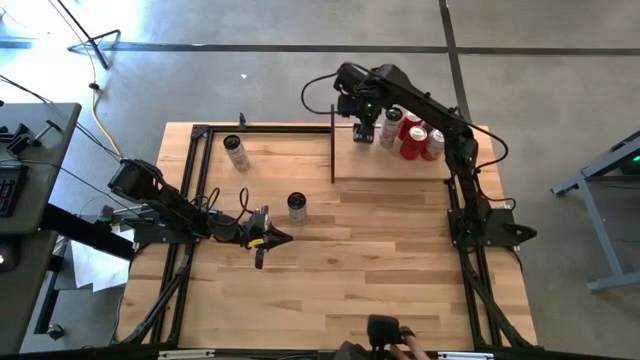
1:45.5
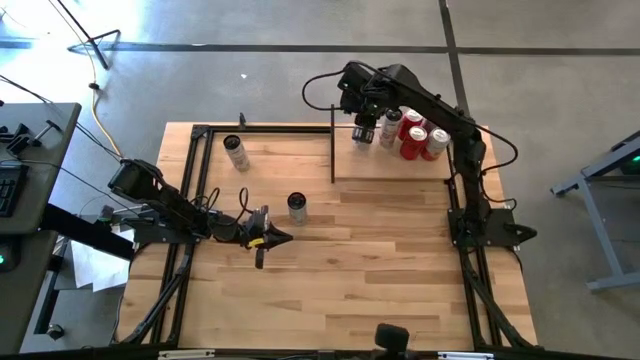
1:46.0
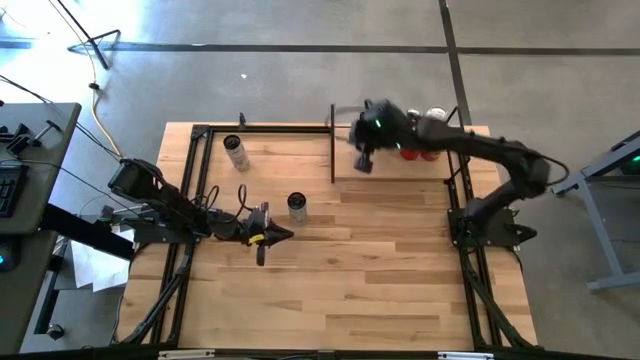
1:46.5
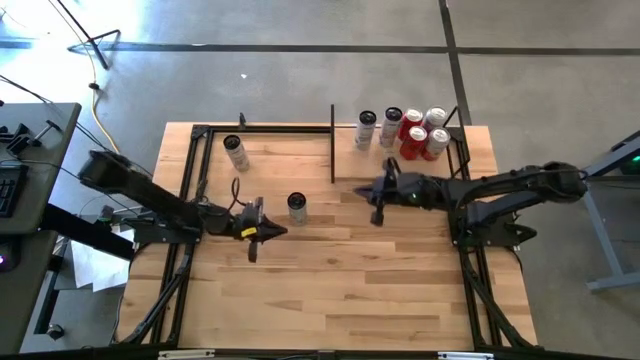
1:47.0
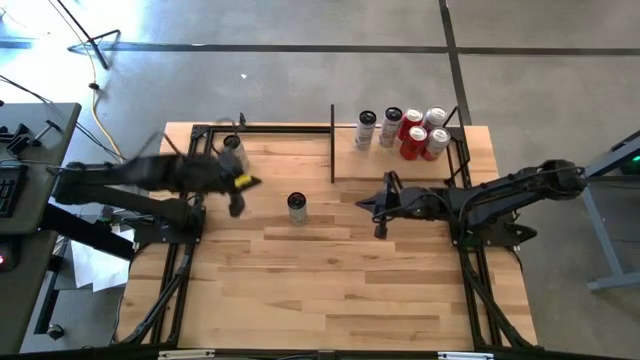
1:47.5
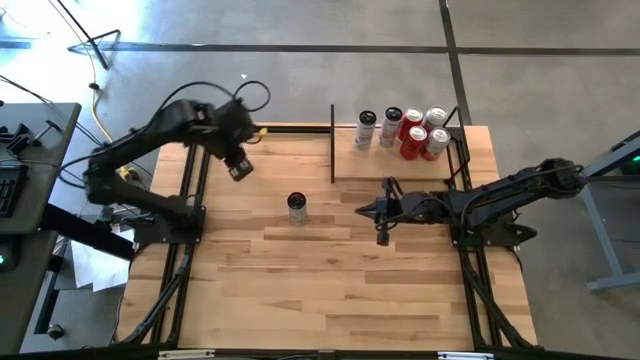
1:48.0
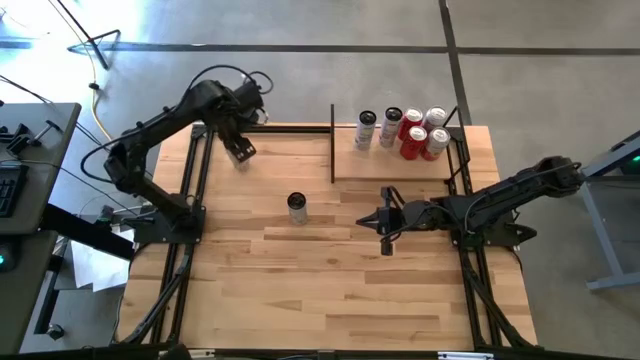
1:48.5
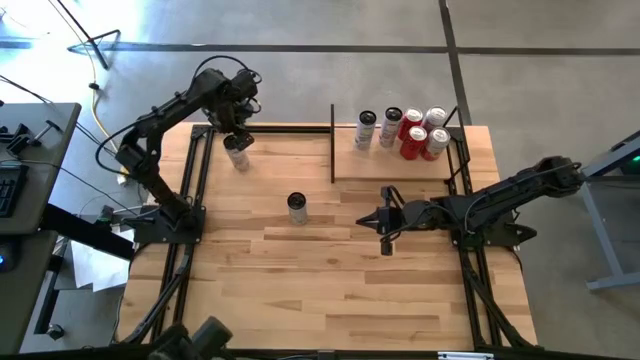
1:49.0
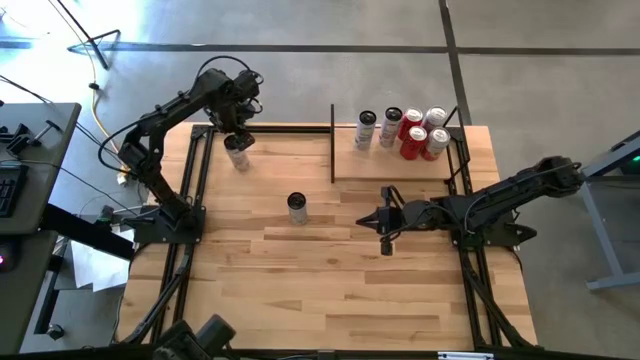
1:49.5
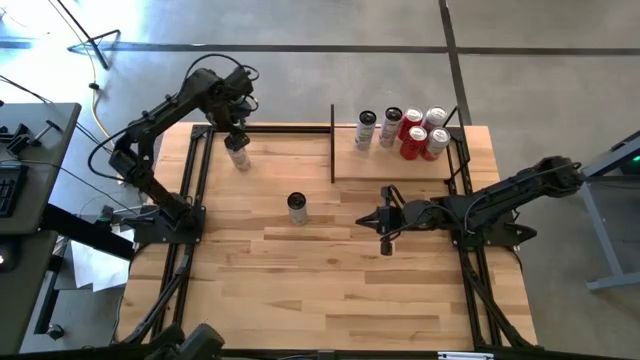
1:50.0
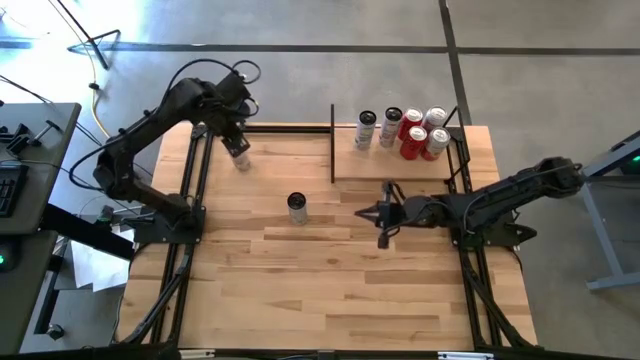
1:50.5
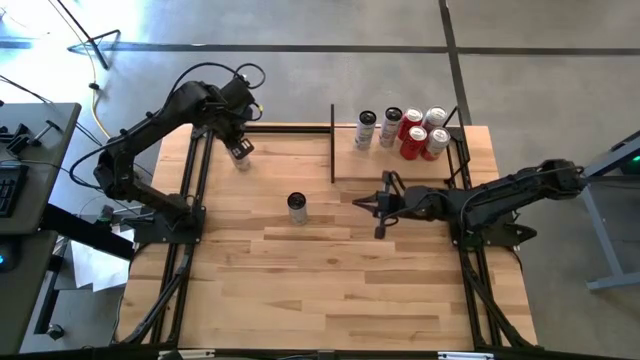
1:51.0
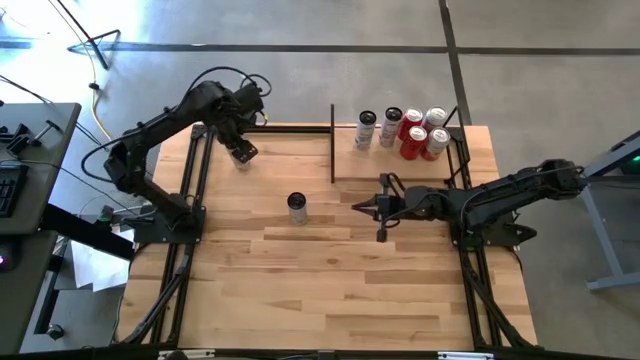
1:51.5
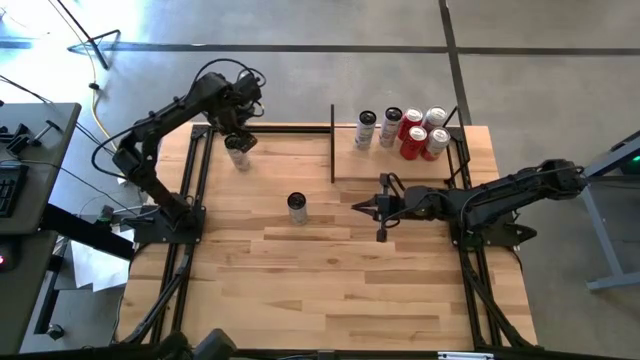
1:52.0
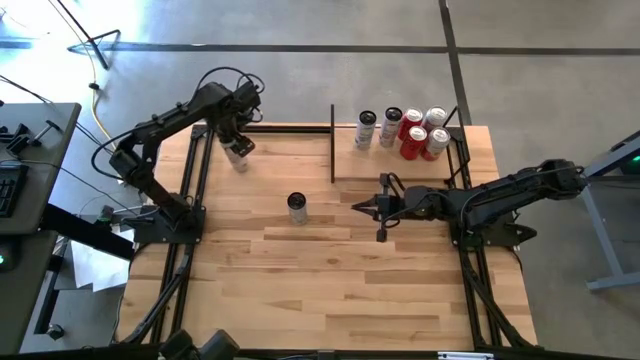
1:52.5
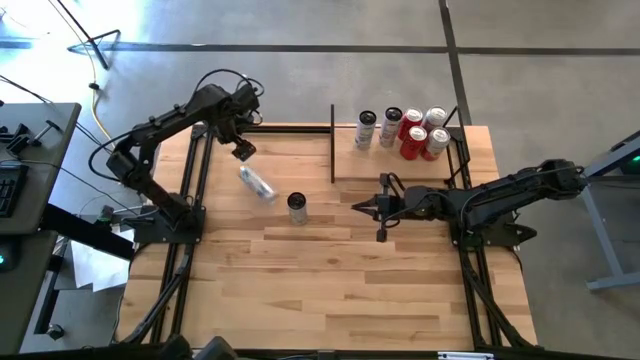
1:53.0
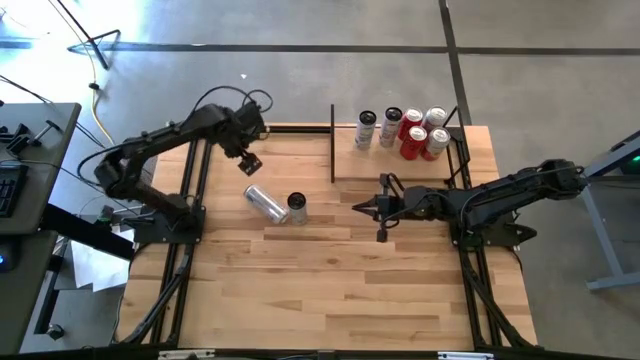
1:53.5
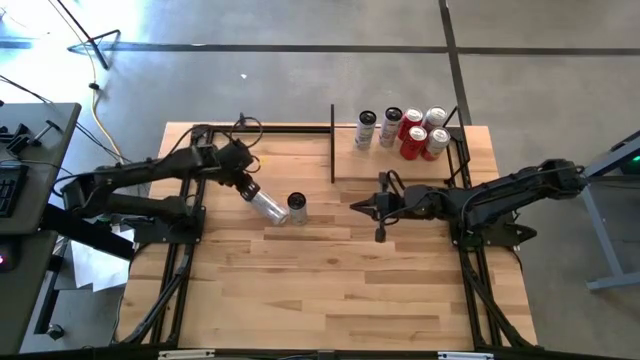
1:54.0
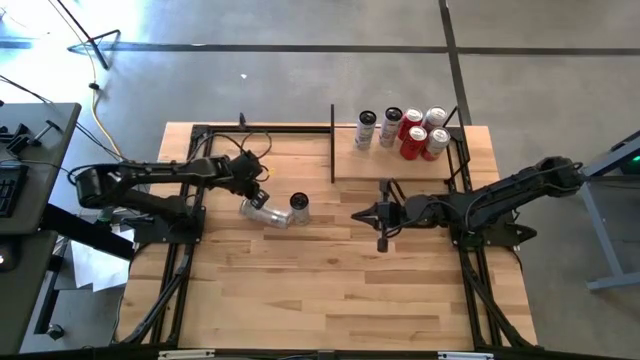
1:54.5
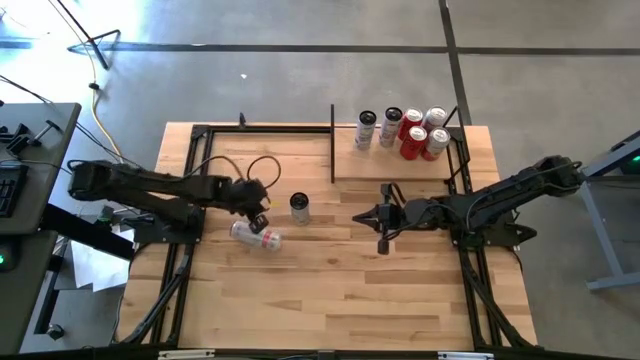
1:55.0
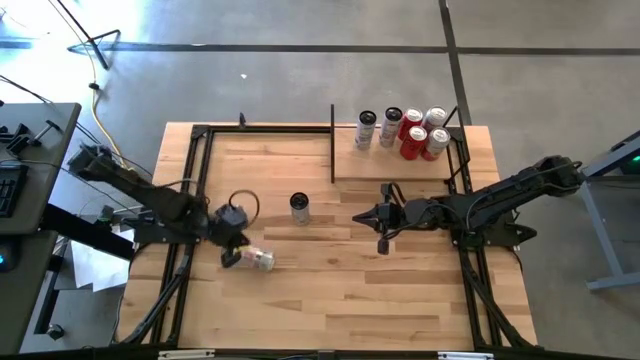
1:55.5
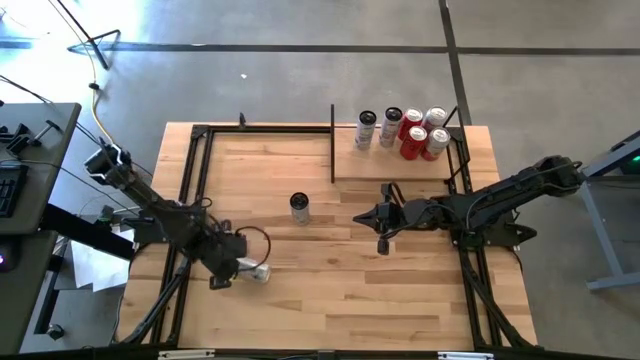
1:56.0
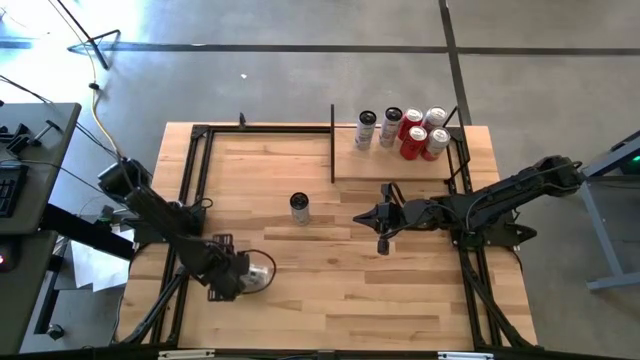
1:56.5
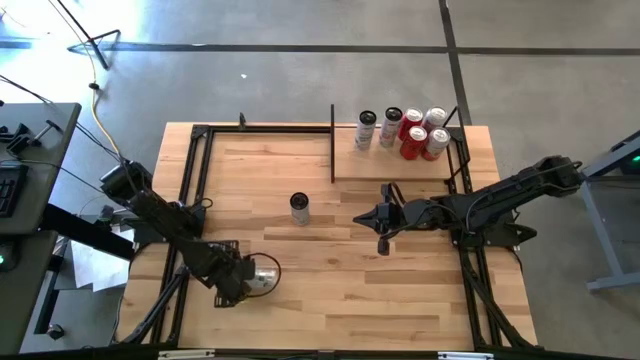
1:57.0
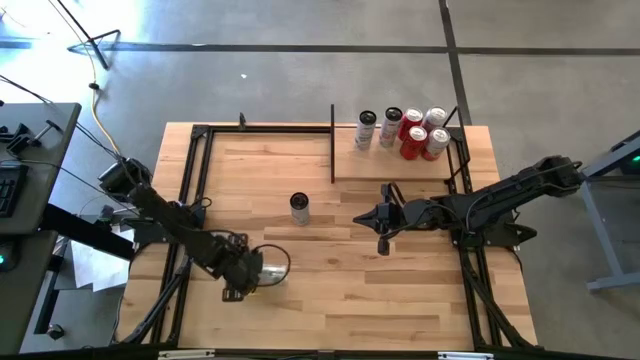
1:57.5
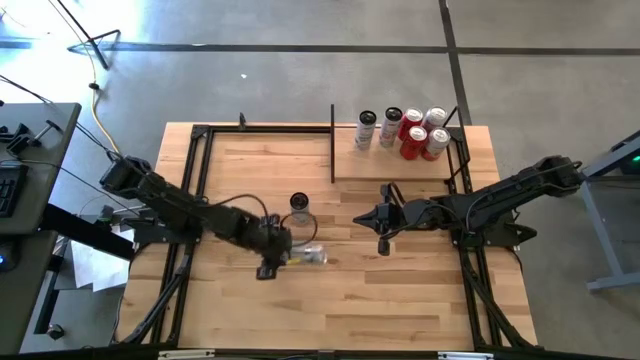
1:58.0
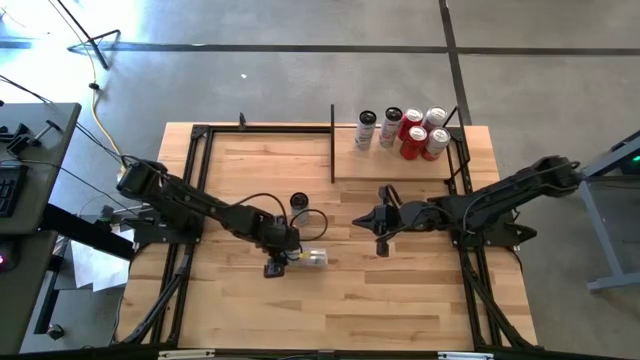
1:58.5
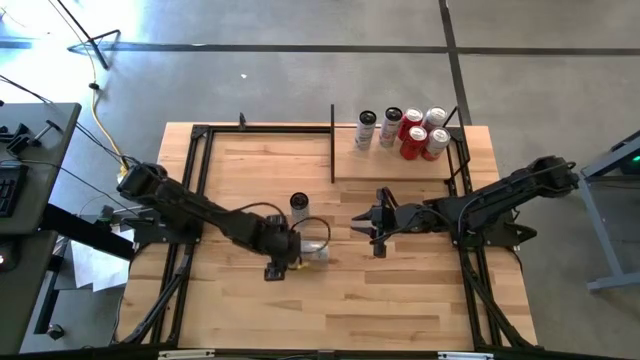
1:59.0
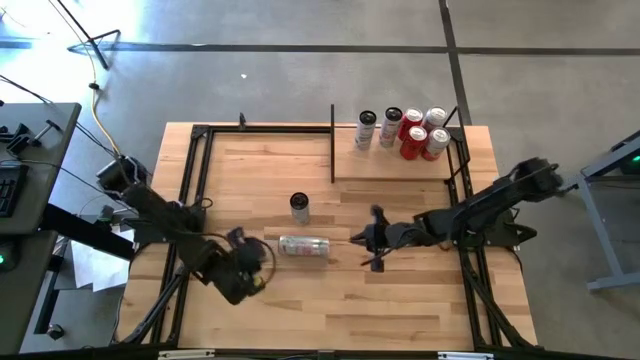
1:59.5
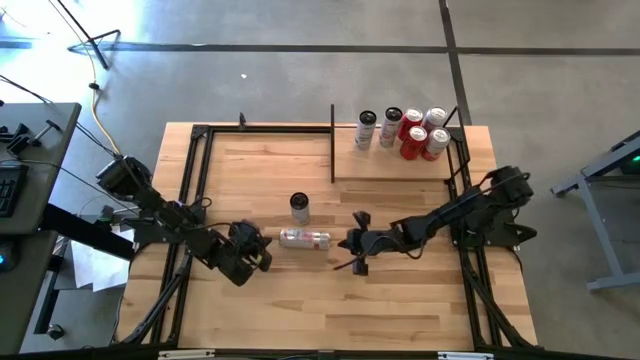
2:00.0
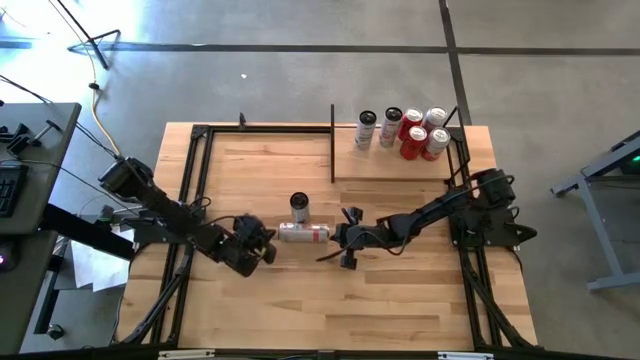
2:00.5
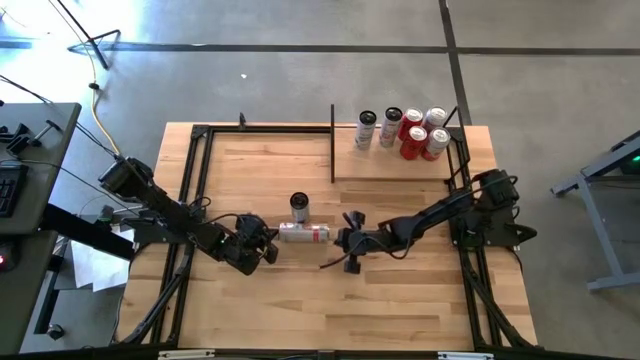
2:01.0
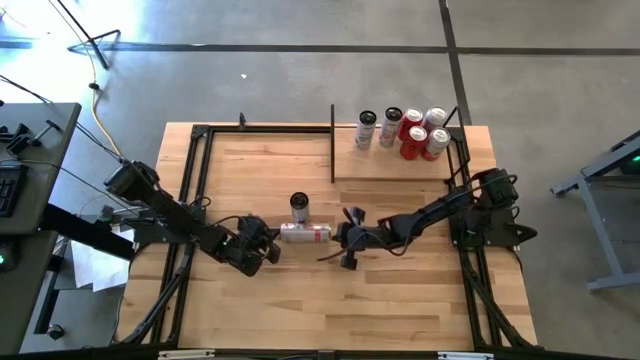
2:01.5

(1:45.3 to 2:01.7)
Task: Place canned beverage on shelf
Put the peach vibe soda can on the shelf aligned with the other peach vibe soda can

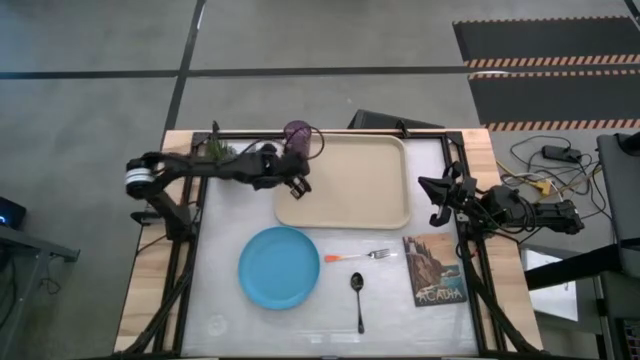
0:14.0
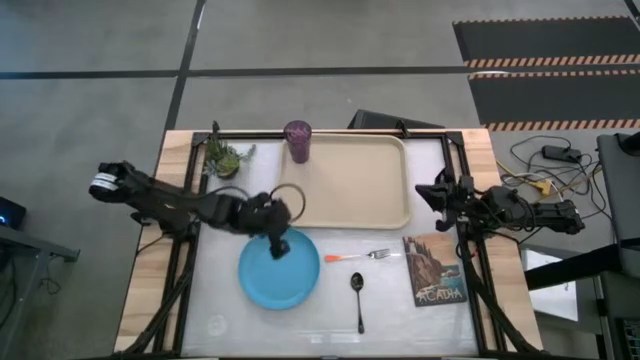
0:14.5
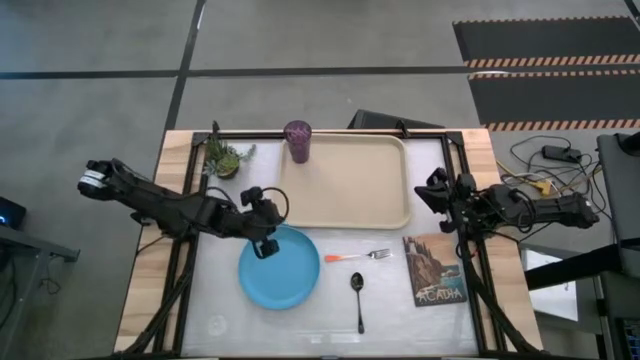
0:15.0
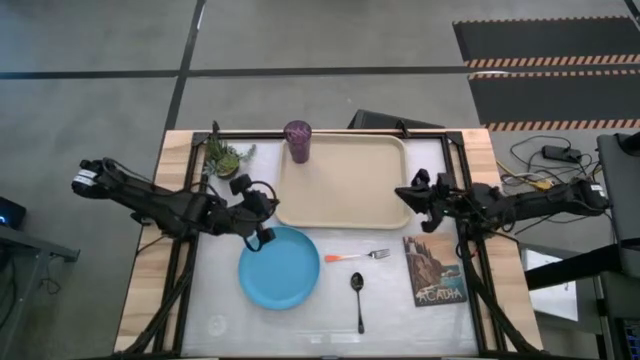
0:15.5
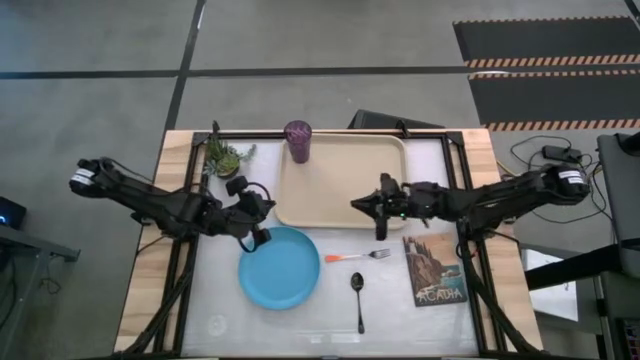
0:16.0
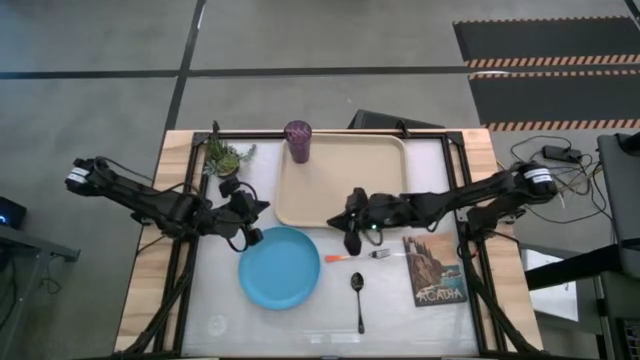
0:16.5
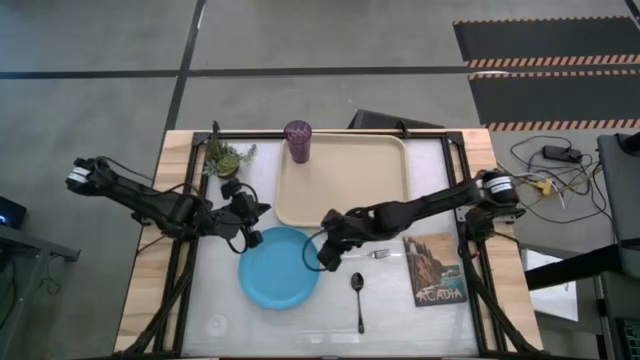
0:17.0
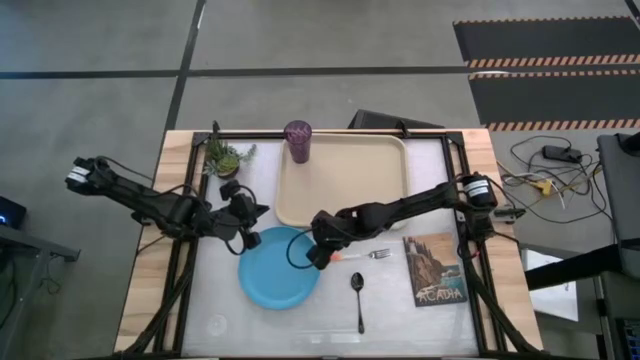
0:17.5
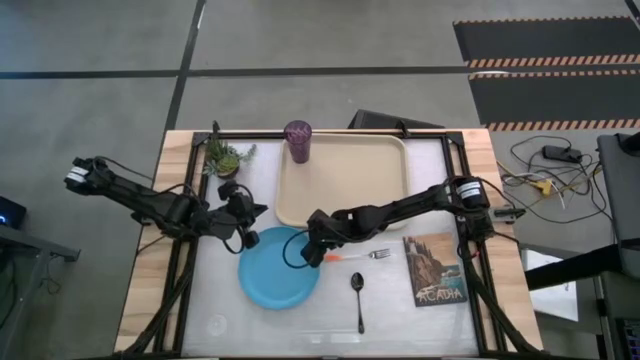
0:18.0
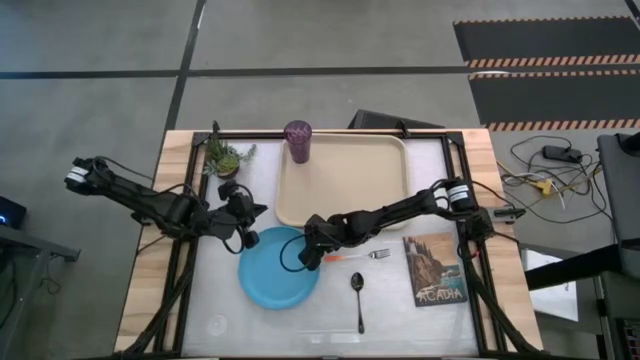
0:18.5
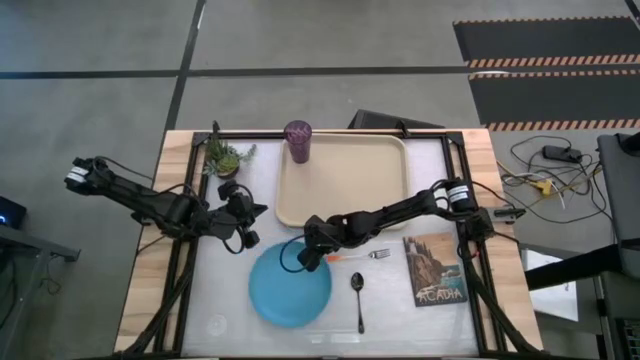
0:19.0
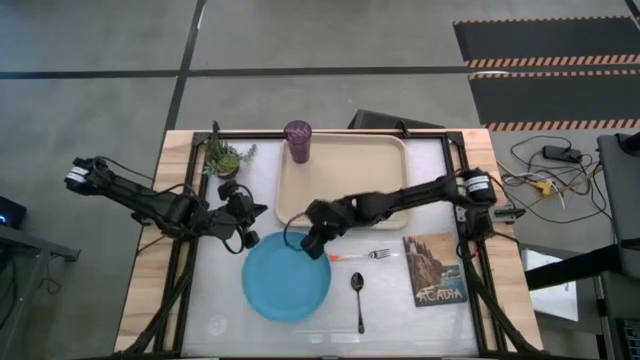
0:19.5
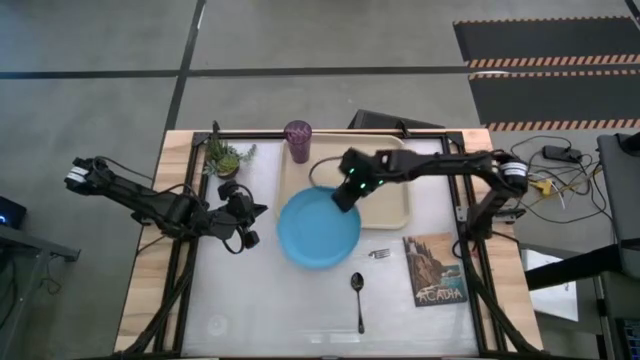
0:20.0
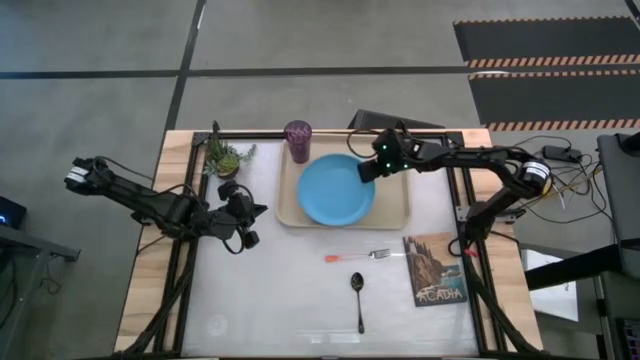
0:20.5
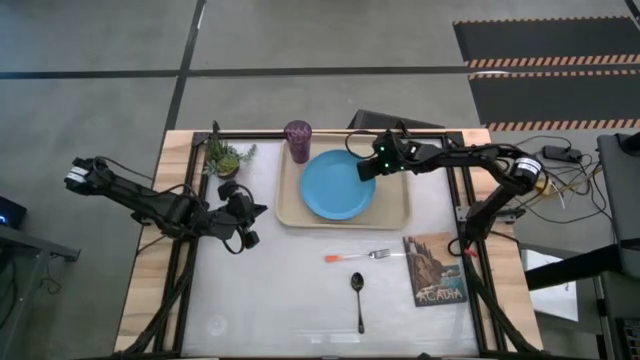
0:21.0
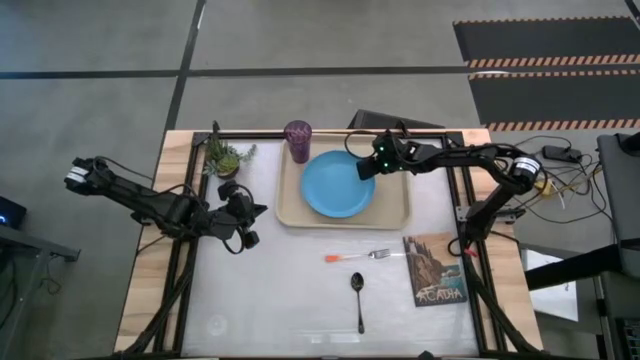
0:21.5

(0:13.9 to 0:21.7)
Task: Pick and place plate/cup/fork/spoon on tray
Put the blue plate on the white serving tray to the bottom right of the violet glass
